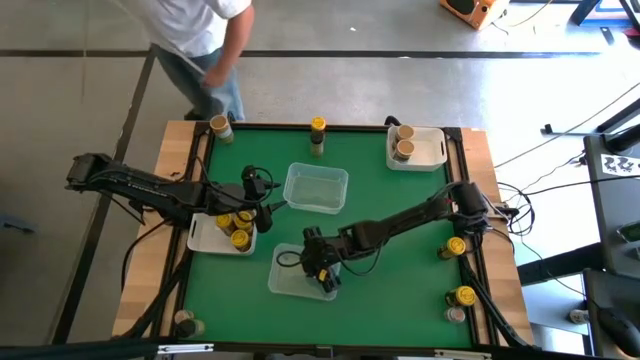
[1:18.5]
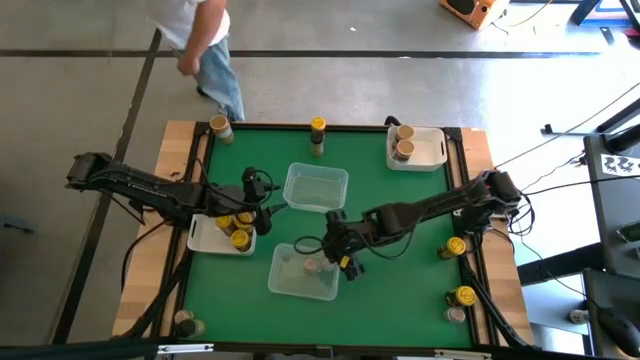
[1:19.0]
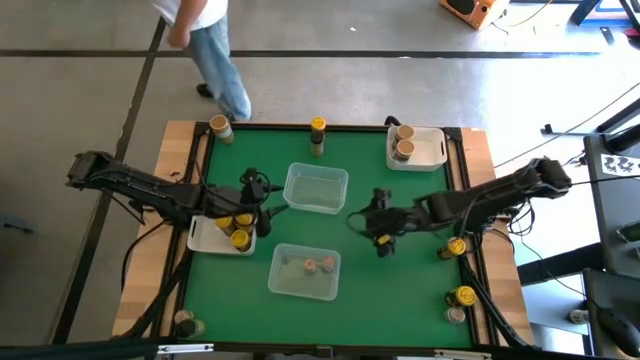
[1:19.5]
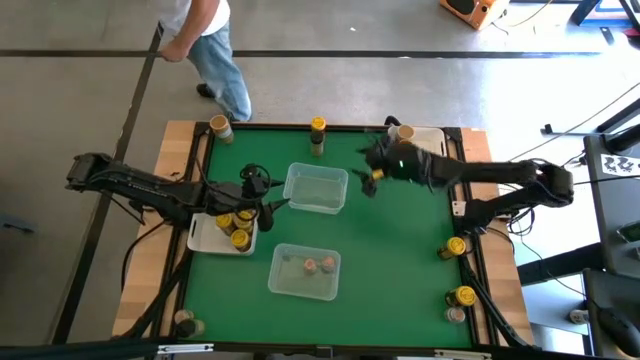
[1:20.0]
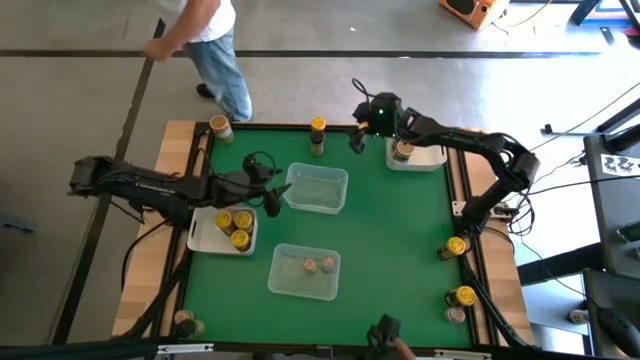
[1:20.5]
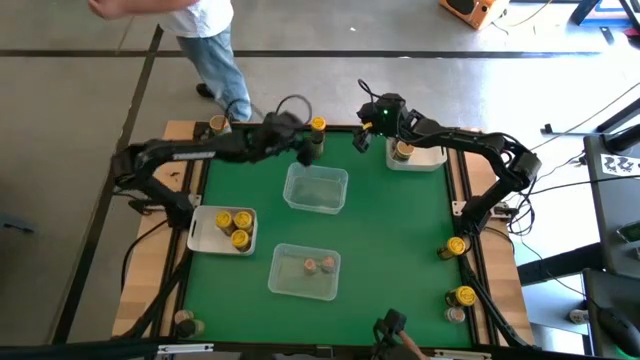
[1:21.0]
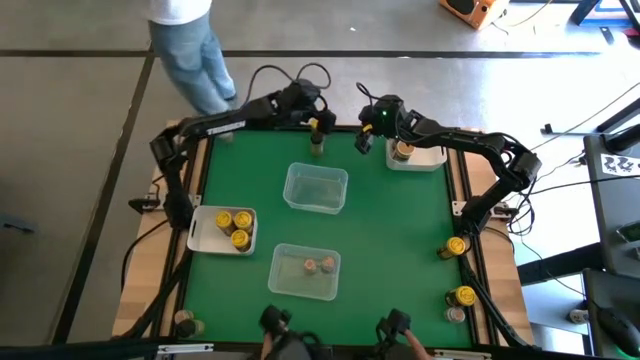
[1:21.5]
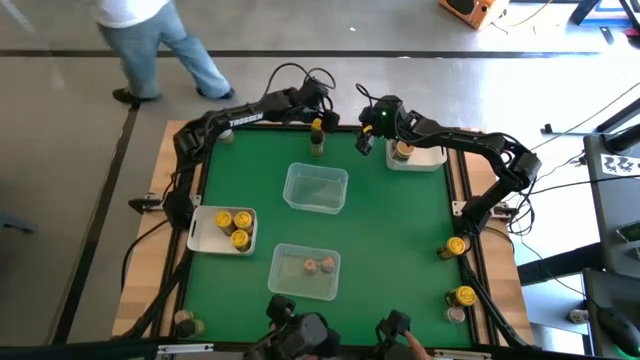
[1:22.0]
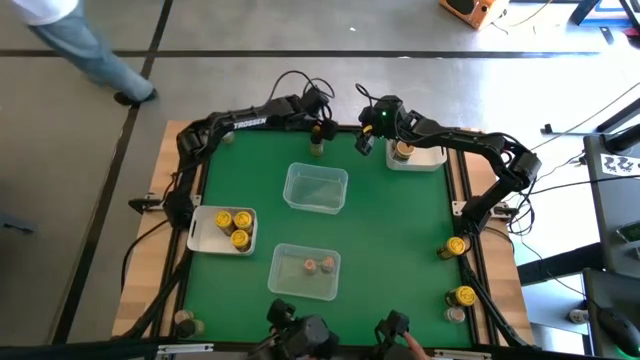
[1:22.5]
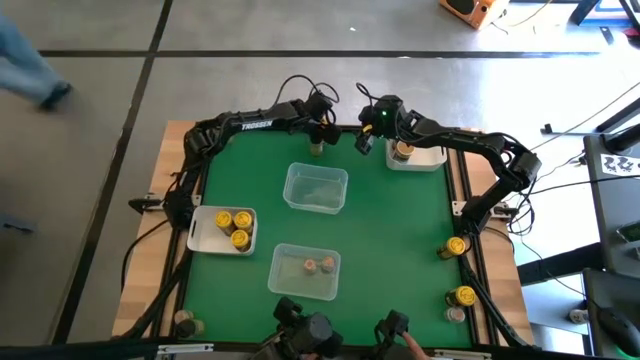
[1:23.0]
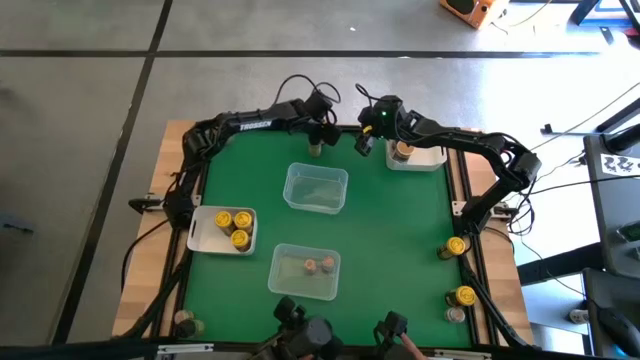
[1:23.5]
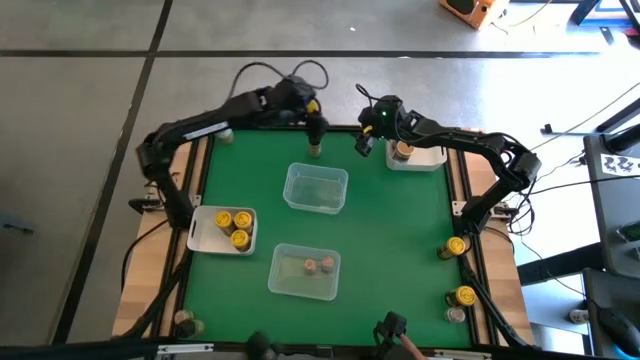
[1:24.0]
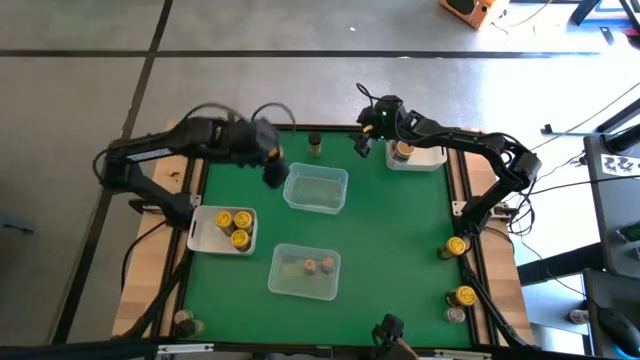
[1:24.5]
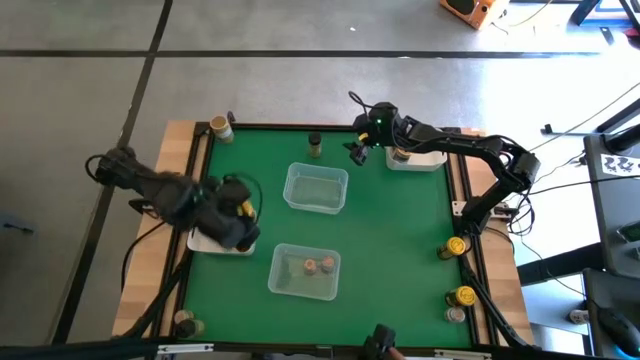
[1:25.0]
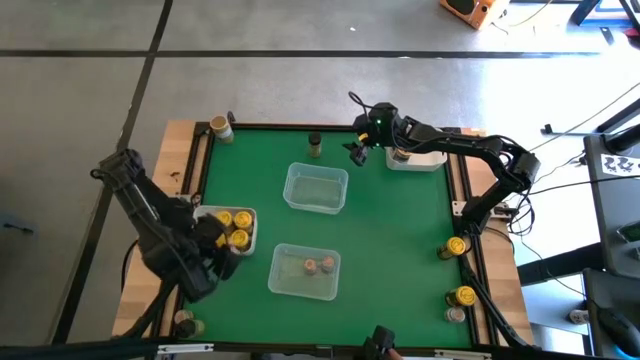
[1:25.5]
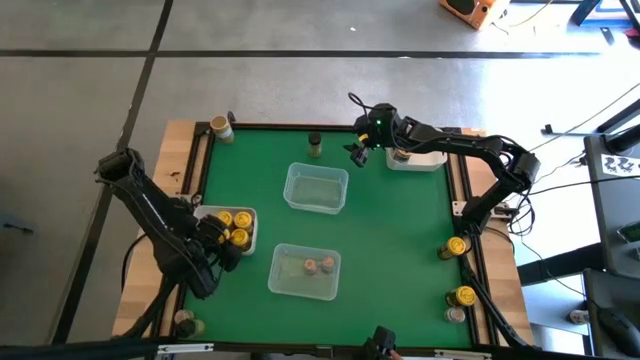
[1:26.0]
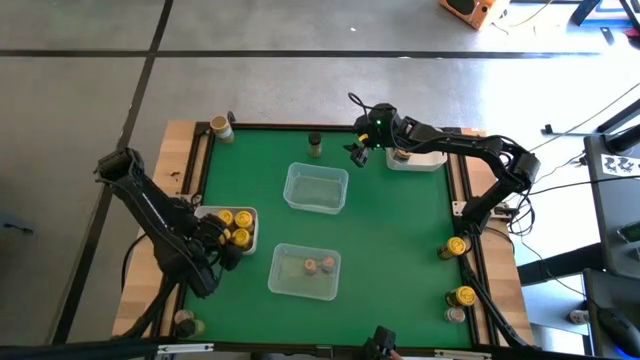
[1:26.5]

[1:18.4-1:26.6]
Task: Sort spices by type
Put the yellow spice can into the bottom white bin

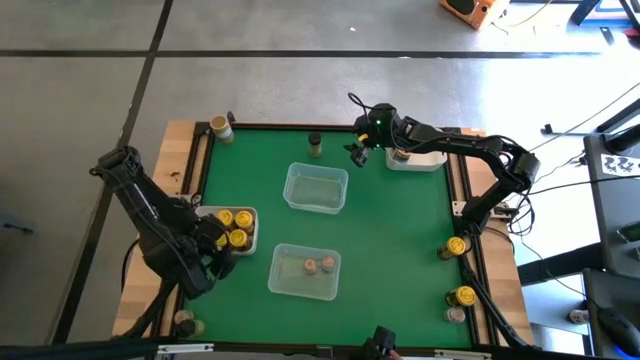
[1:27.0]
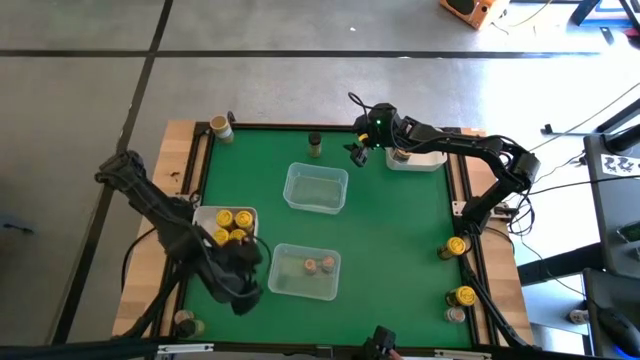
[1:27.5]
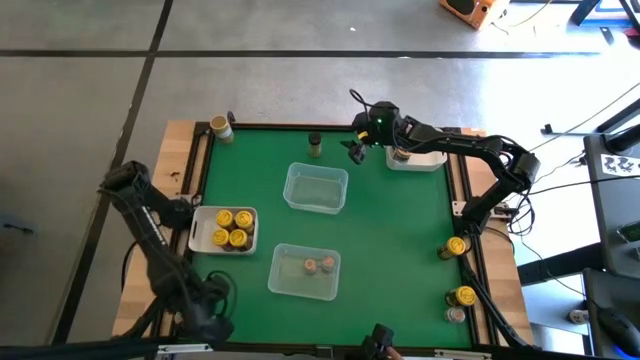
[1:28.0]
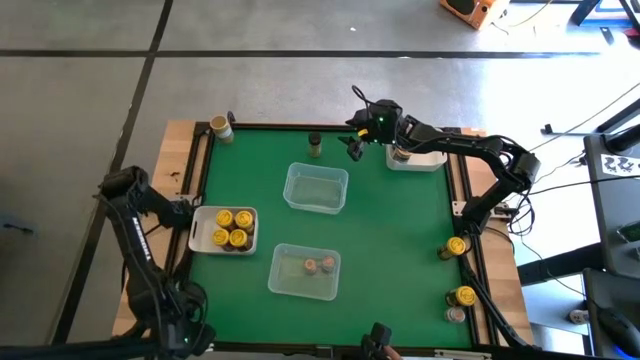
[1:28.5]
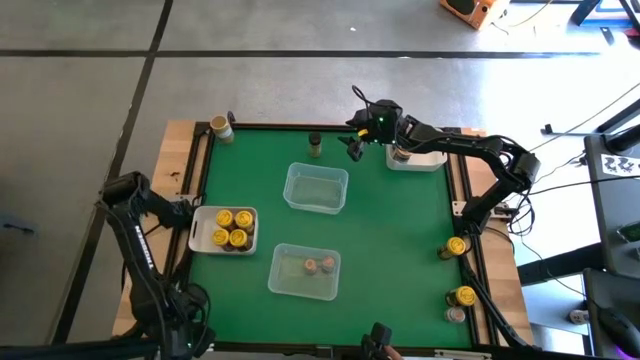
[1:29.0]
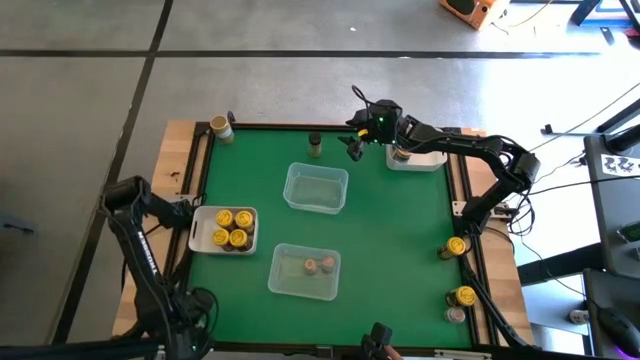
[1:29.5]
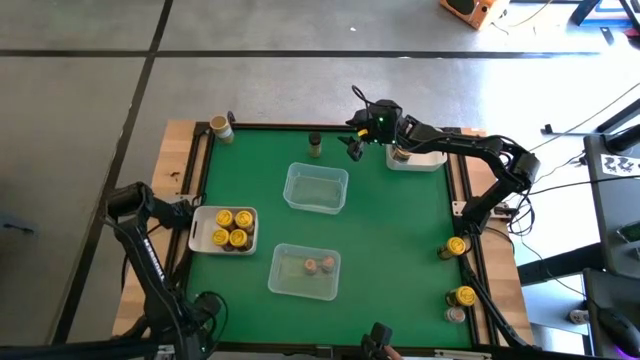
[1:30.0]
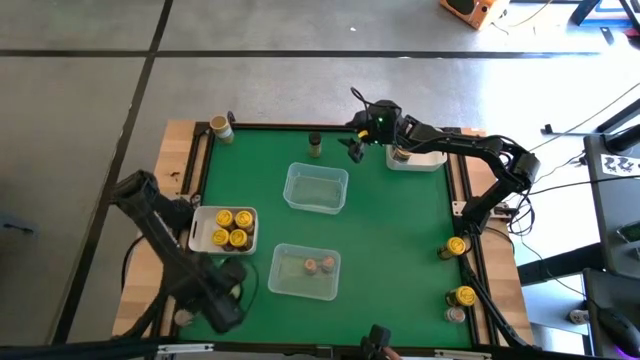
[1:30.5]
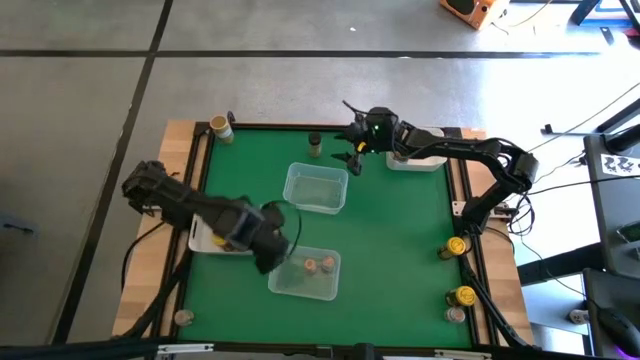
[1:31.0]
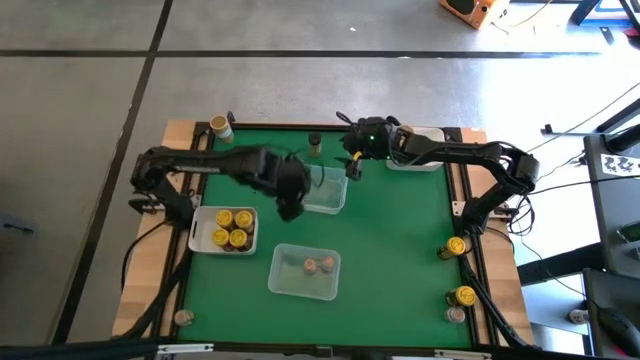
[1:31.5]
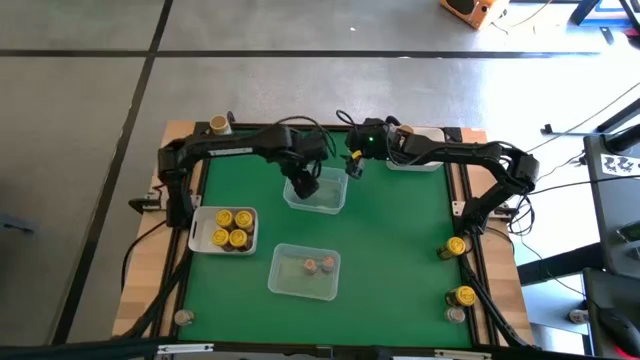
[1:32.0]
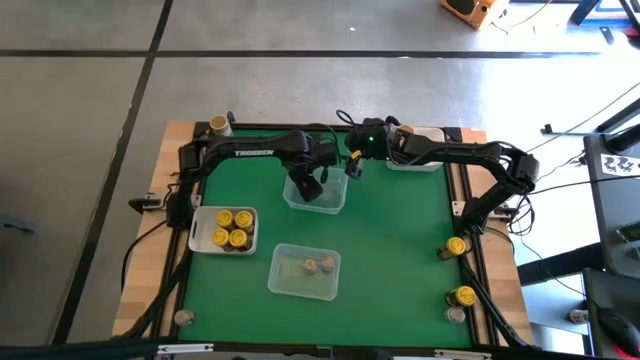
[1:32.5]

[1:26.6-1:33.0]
Put the black spice bottle into the top transparent bin

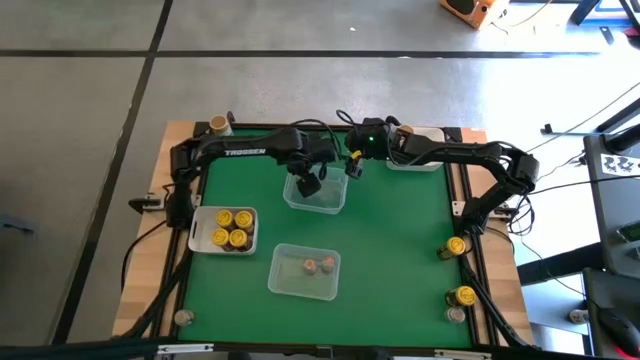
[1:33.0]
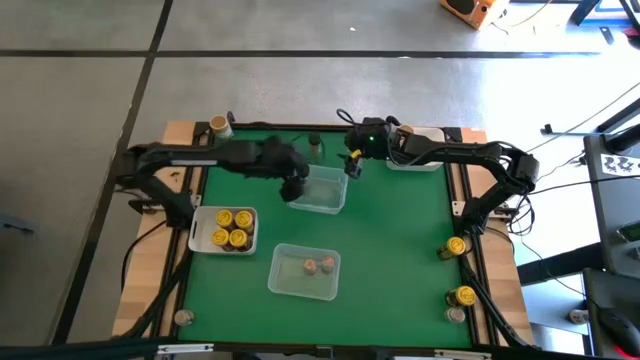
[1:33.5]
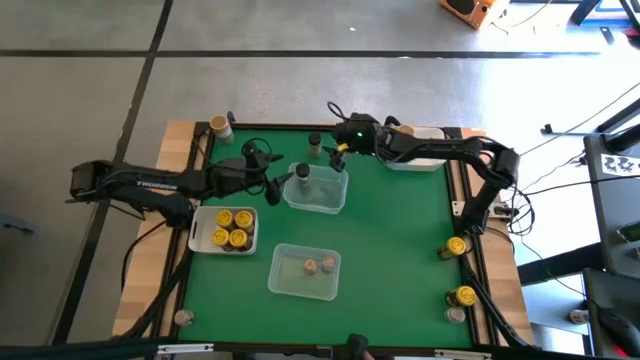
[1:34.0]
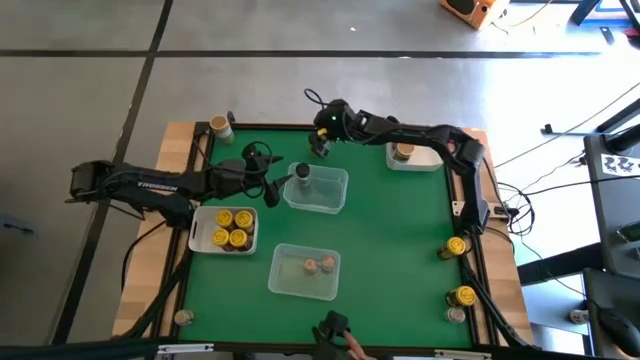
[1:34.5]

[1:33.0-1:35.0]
Put the black spice bottle into the top transparent bin

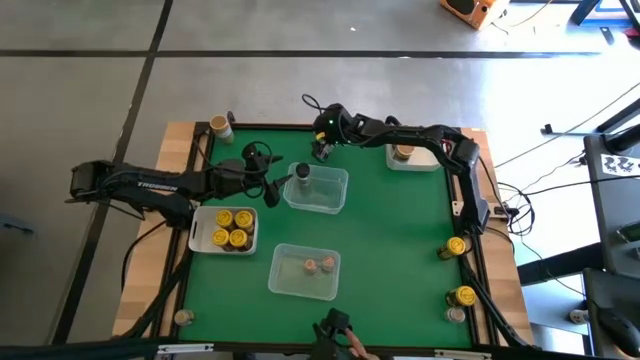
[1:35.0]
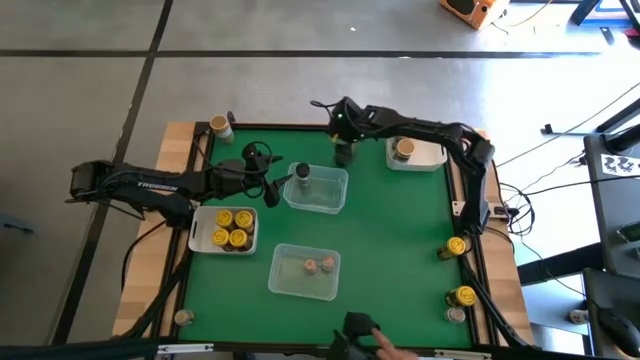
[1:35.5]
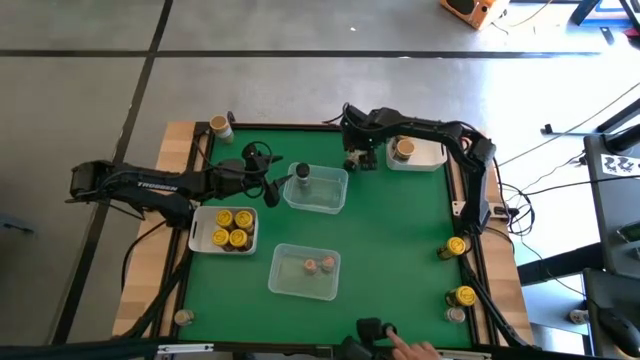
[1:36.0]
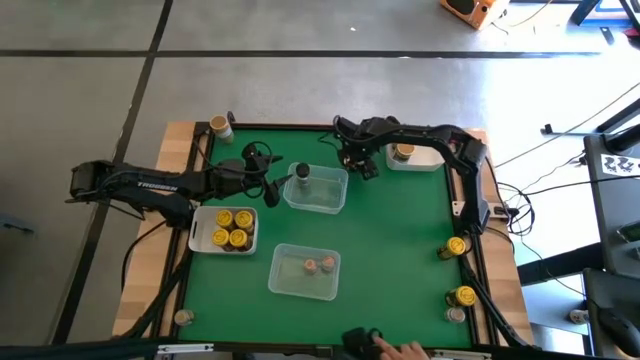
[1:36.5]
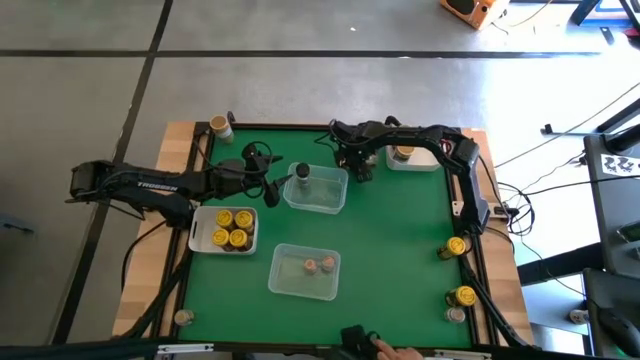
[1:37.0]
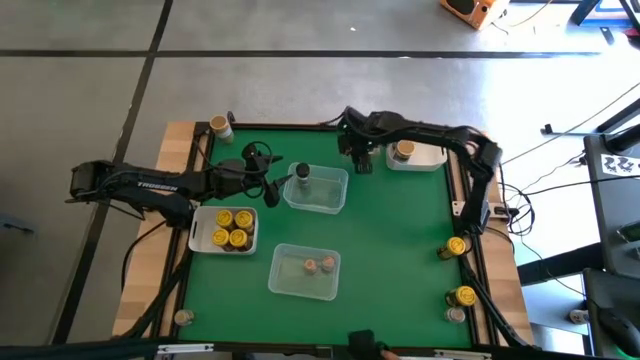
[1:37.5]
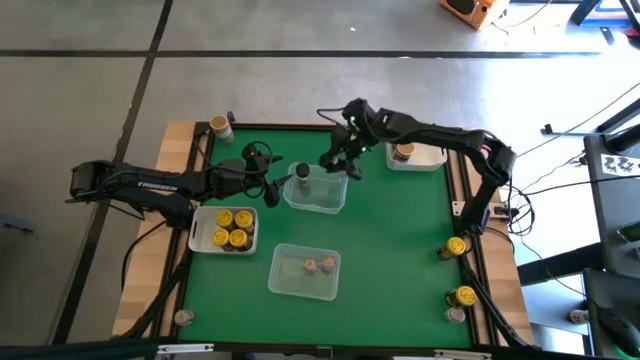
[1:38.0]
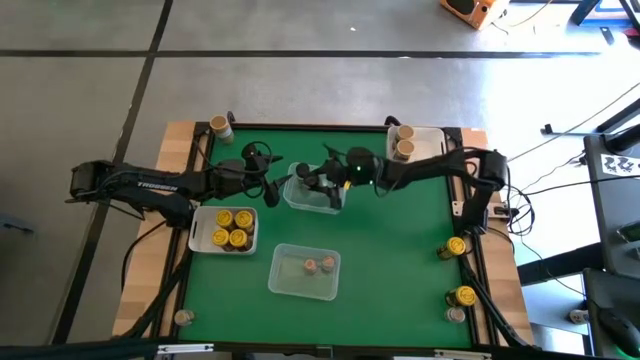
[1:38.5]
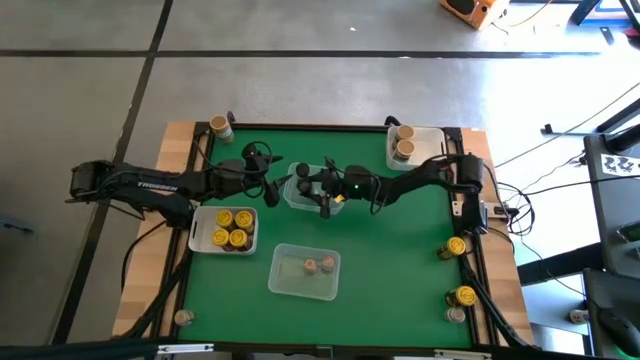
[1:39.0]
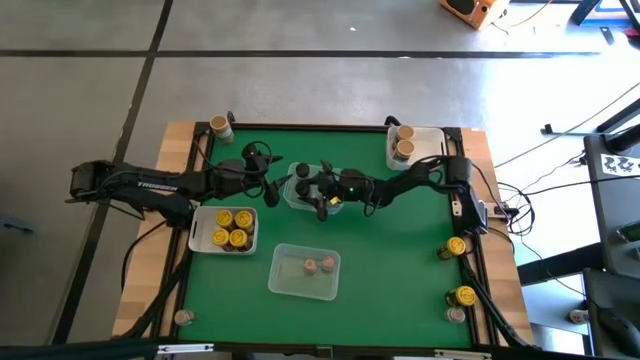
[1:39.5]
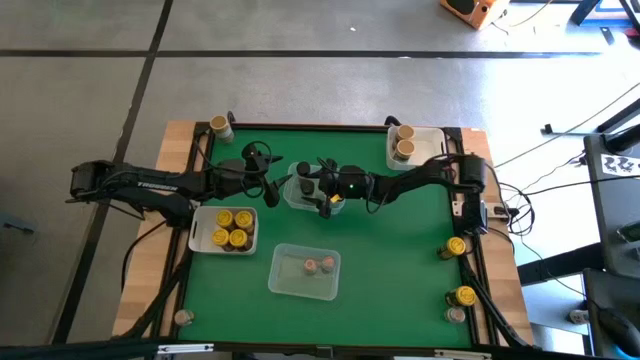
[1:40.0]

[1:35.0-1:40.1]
Put the black spice bottle into the top transparent bin

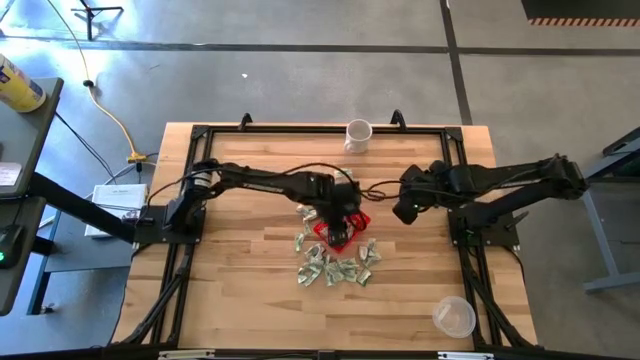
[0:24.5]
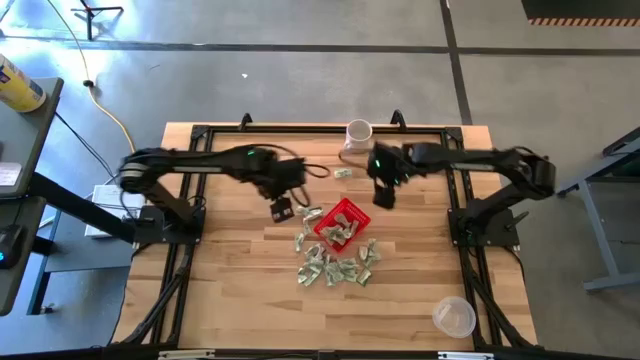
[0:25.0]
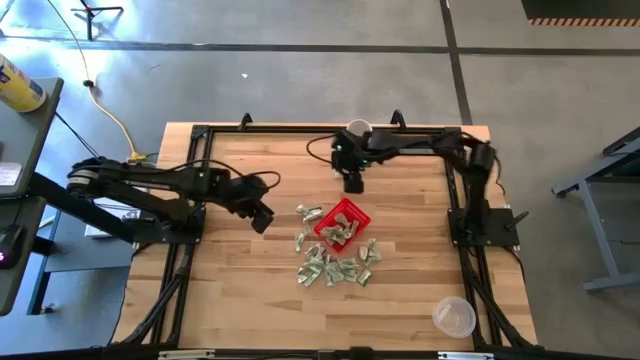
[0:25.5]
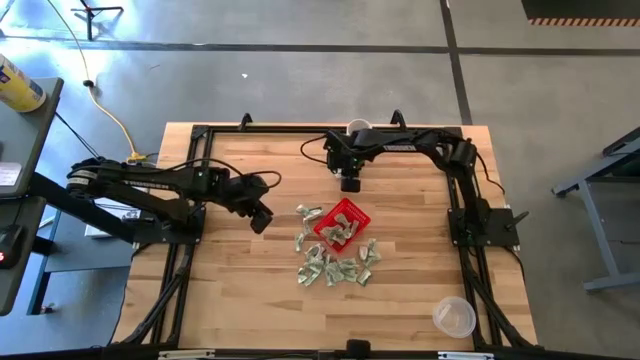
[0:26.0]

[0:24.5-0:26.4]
Task: Pick and place items into bin
Put the white stevia packet into the red bin
